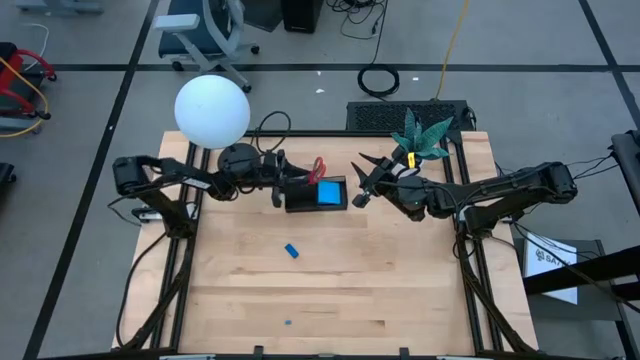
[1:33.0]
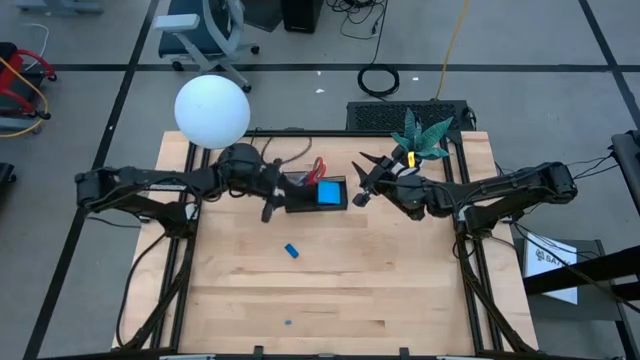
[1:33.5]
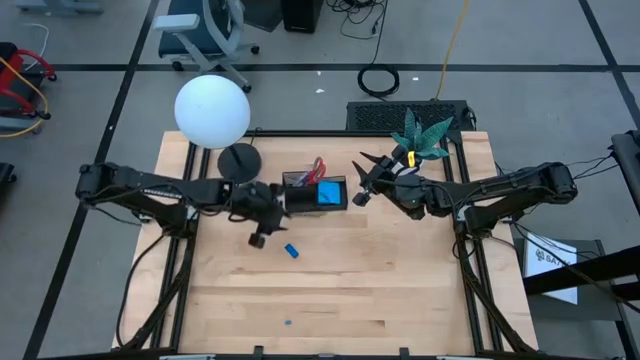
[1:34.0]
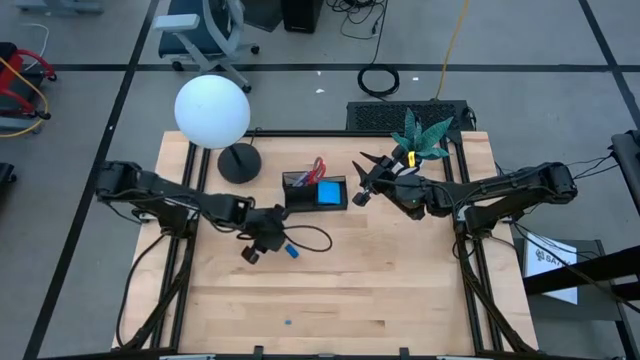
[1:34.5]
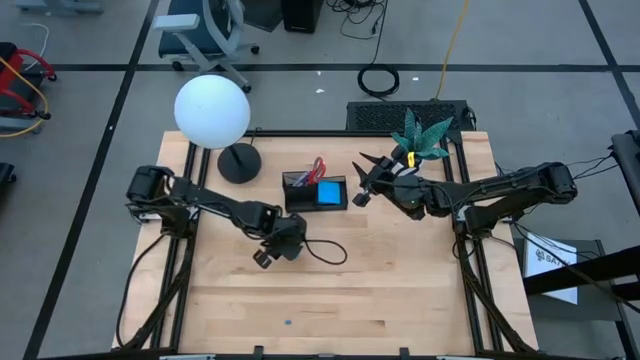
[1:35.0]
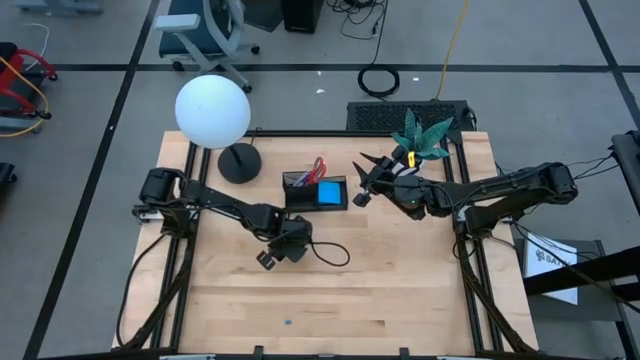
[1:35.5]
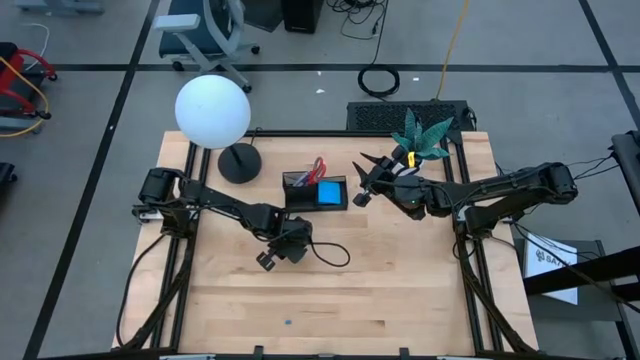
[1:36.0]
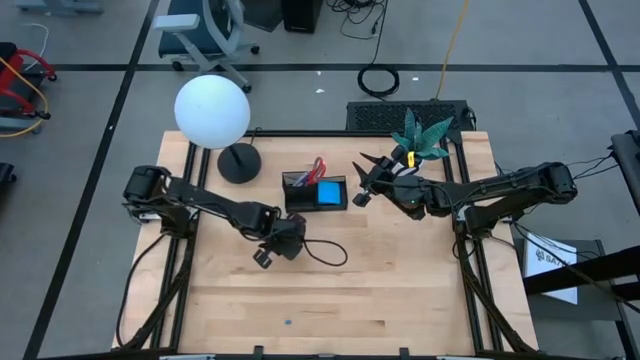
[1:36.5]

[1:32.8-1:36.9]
Task: Pick and place office supplies into organizer
Put the blue eraser into the black mesh organizer

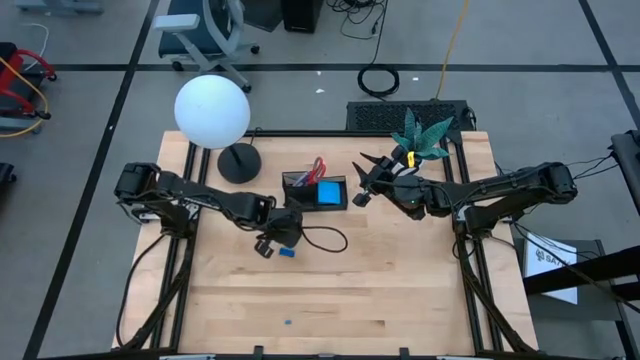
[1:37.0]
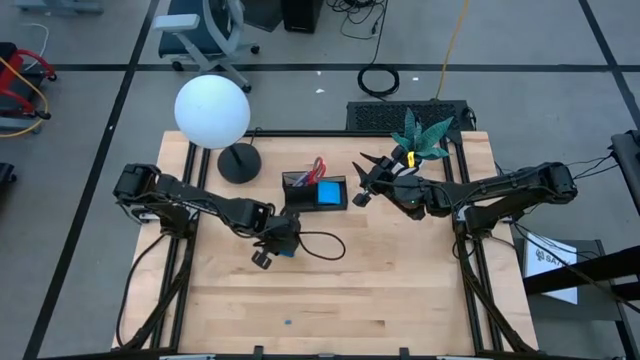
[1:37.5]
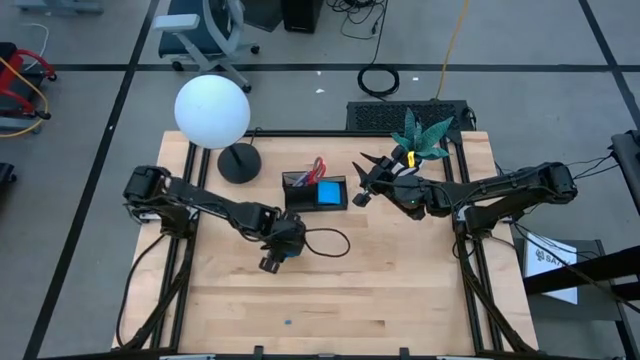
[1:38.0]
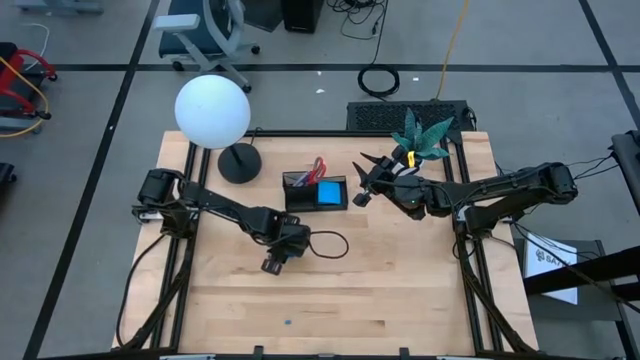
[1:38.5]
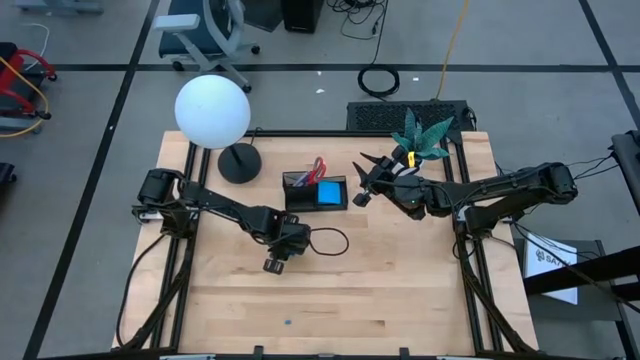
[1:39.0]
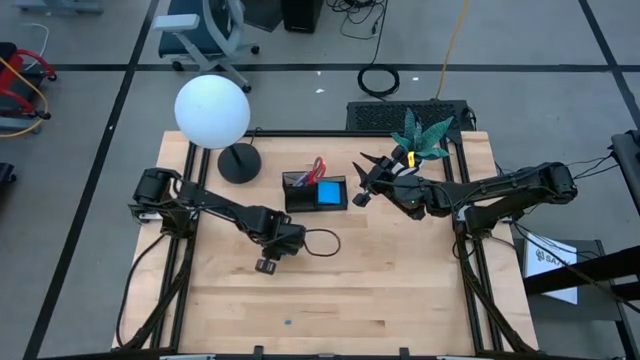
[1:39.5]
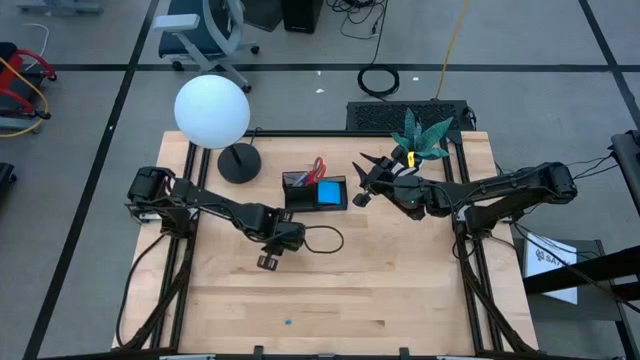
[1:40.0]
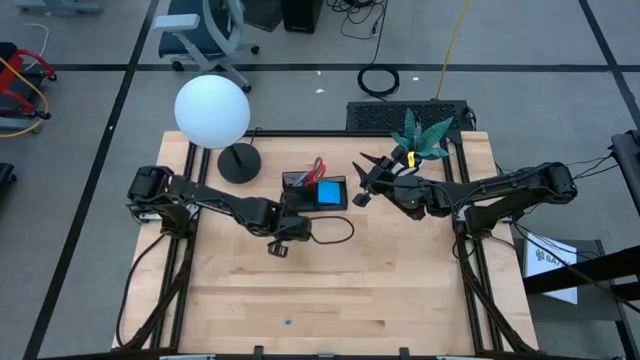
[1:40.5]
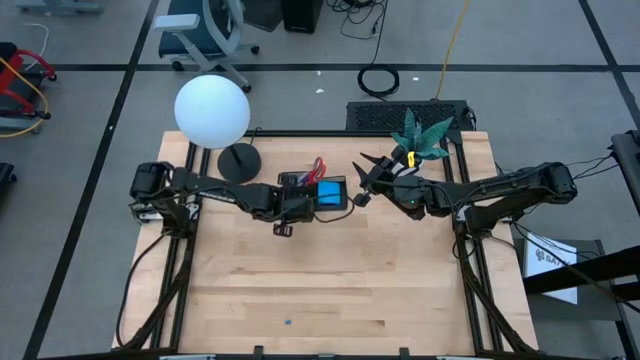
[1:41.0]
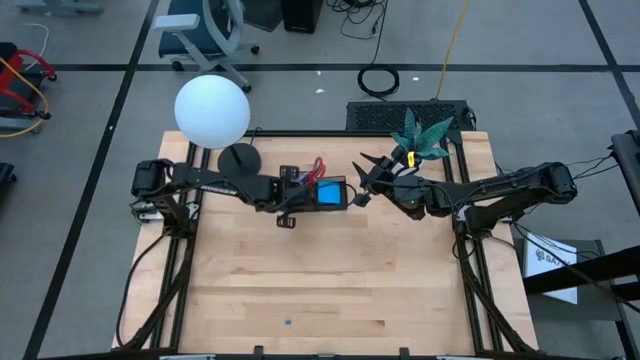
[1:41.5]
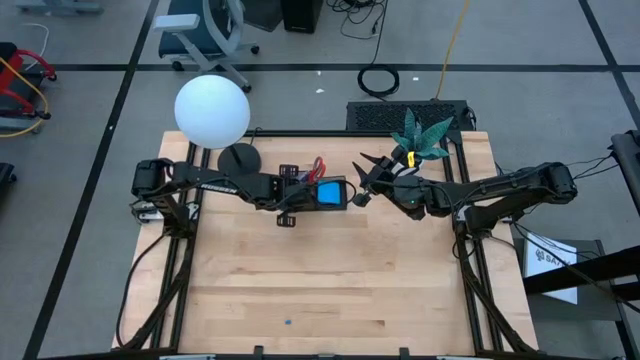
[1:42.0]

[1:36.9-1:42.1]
Put the blue eraser into the black mesh organizer

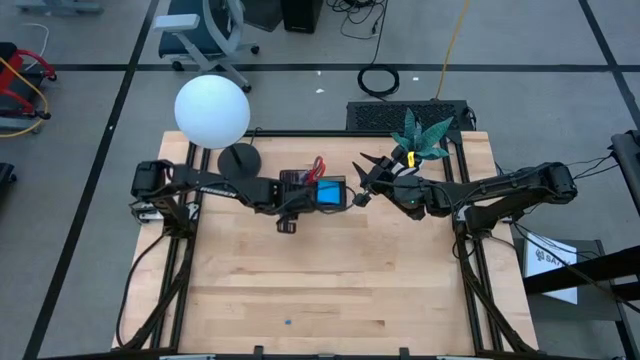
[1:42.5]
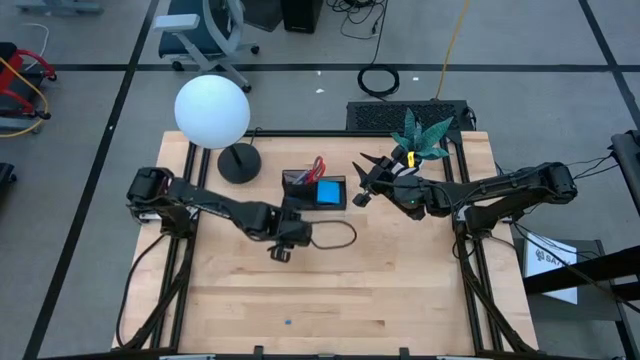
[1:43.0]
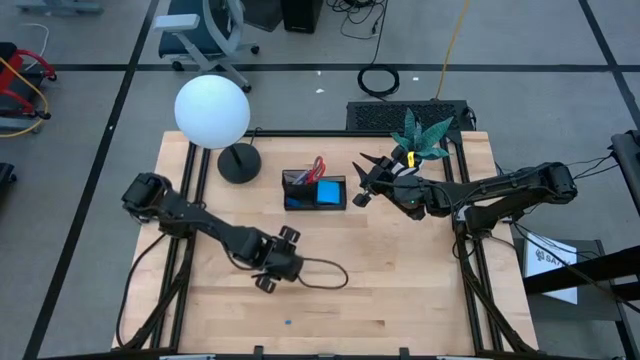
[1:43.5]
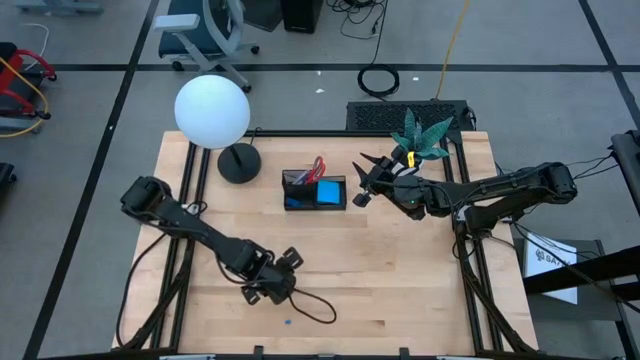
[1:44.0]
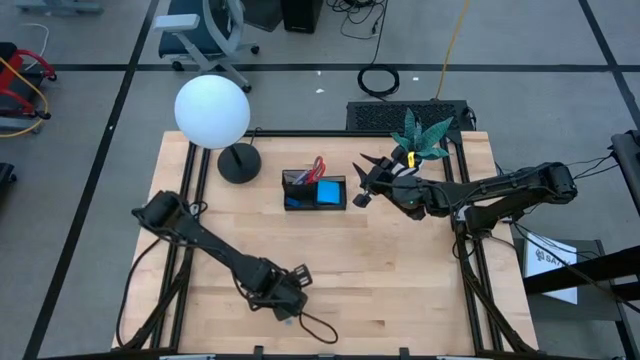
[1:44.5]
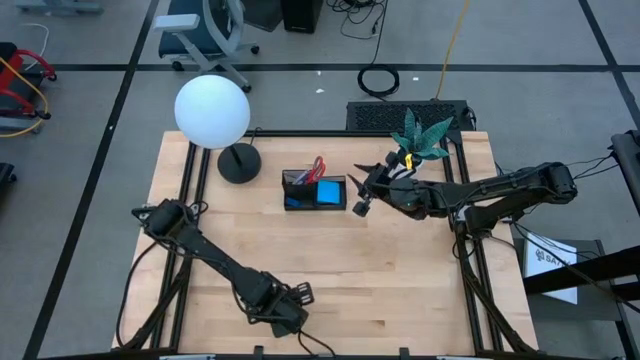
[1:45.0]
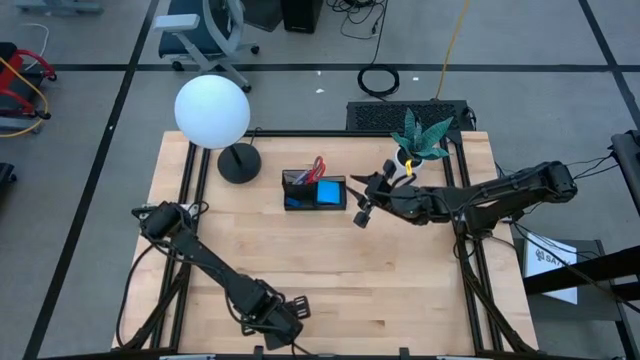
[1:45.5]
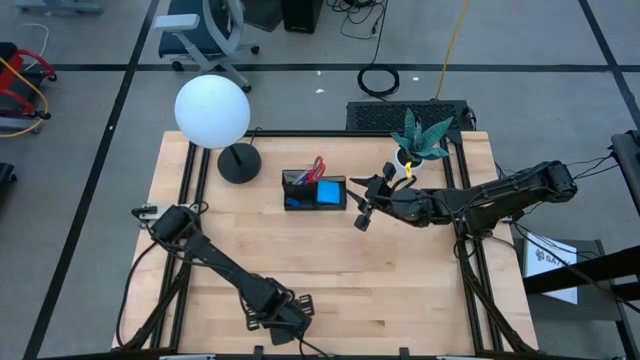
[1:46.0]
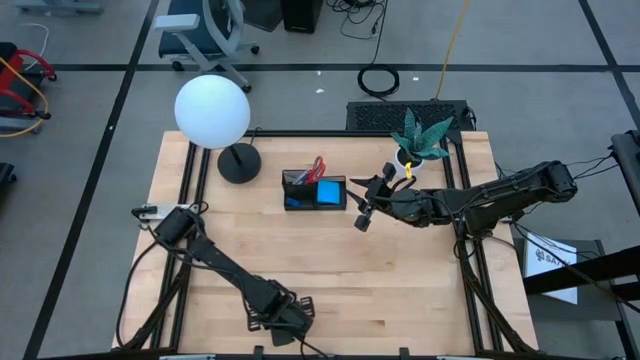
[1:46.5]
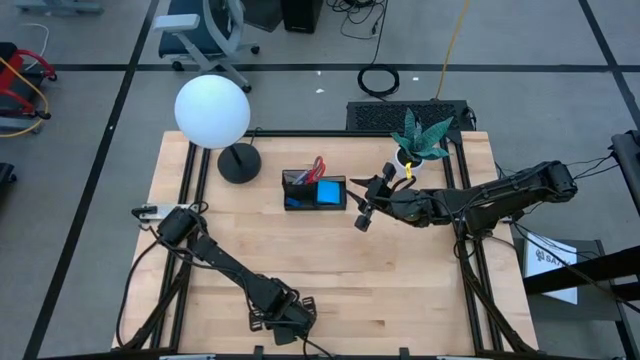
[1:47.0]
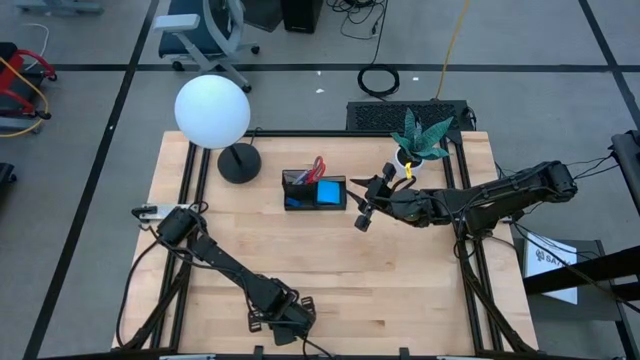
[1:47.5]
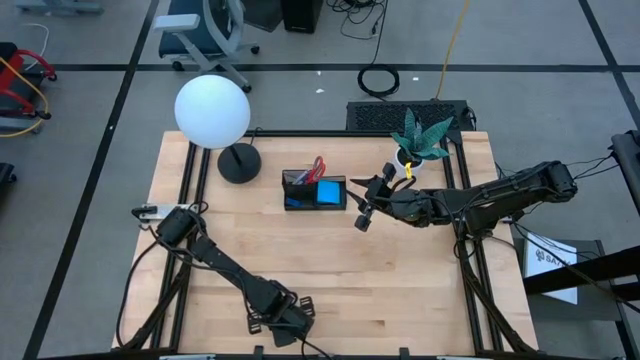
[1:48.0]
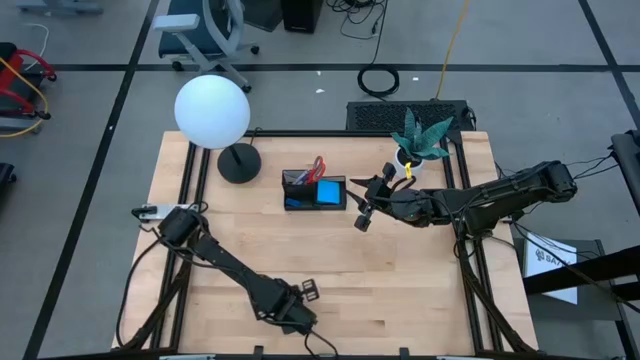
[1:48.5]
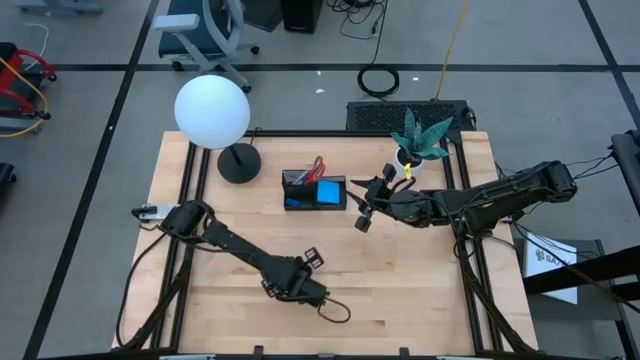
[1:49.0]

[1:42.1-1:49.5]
Put the blue binder clip into the black mesh organizer

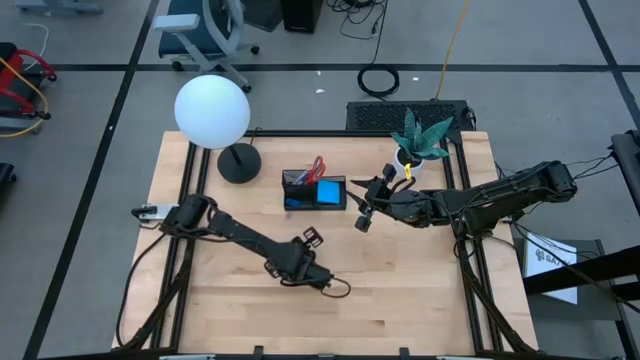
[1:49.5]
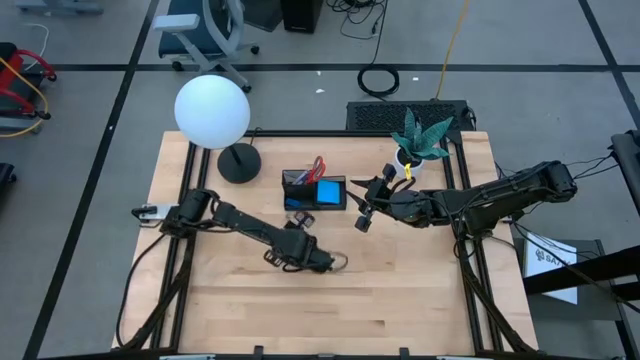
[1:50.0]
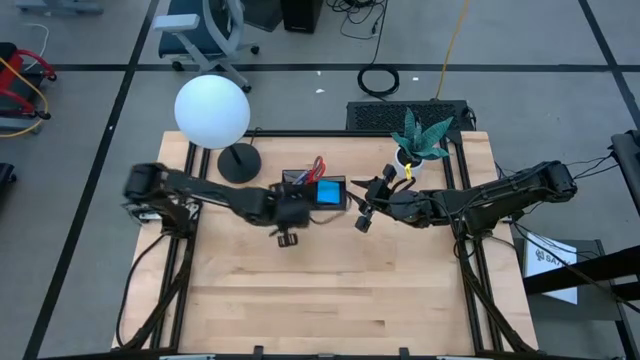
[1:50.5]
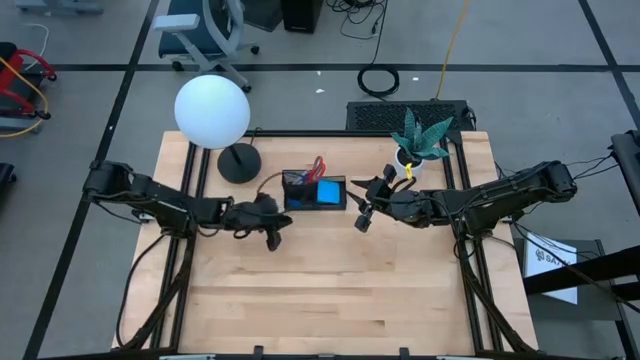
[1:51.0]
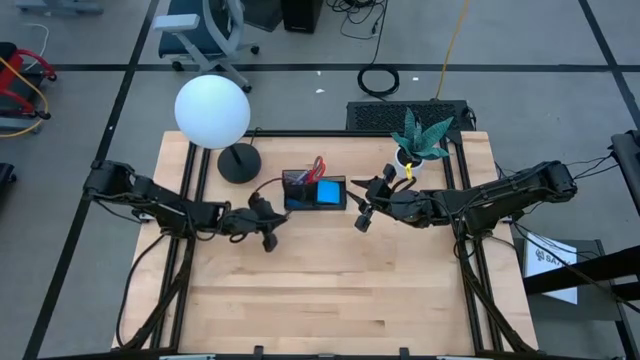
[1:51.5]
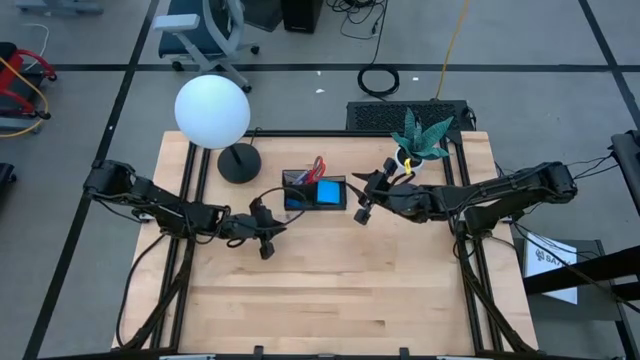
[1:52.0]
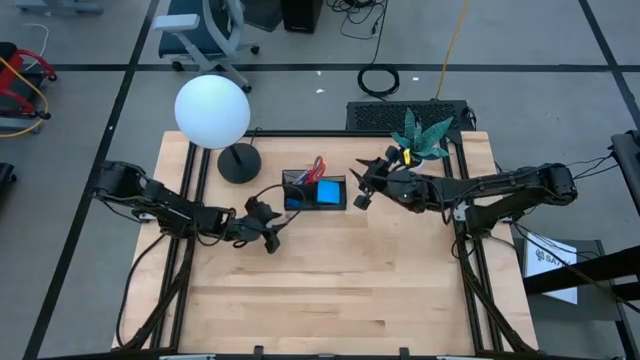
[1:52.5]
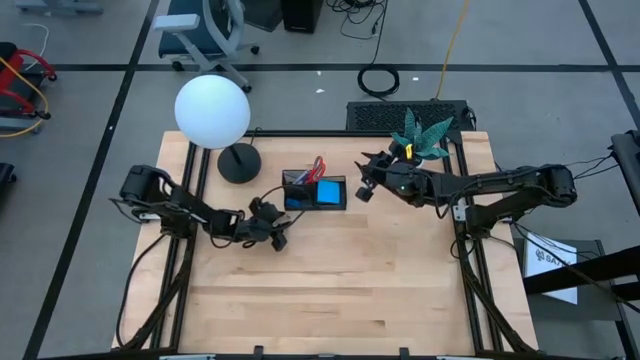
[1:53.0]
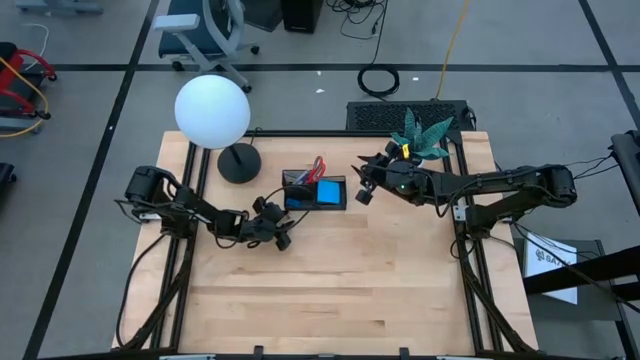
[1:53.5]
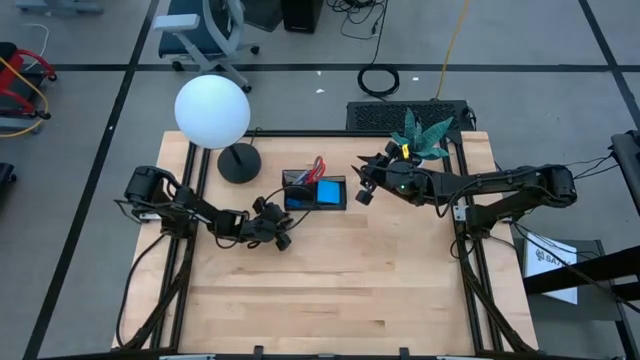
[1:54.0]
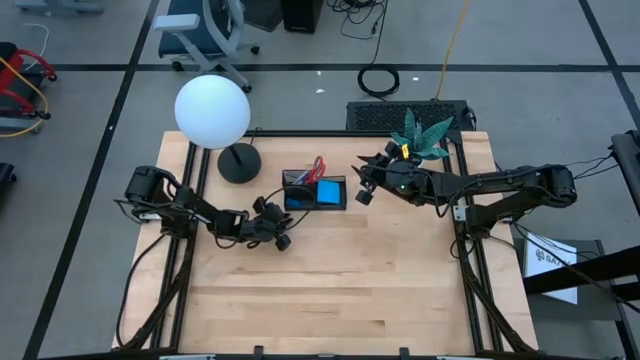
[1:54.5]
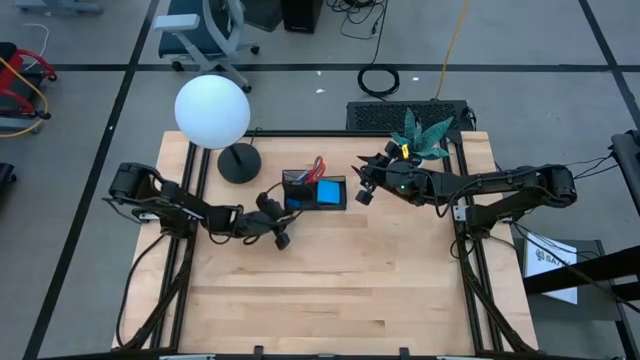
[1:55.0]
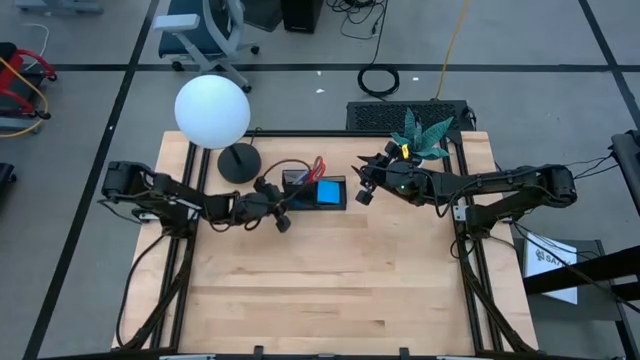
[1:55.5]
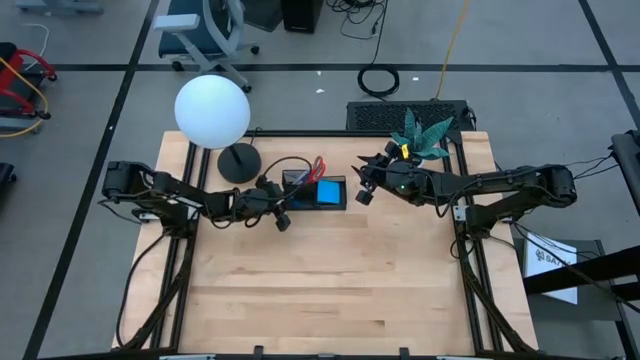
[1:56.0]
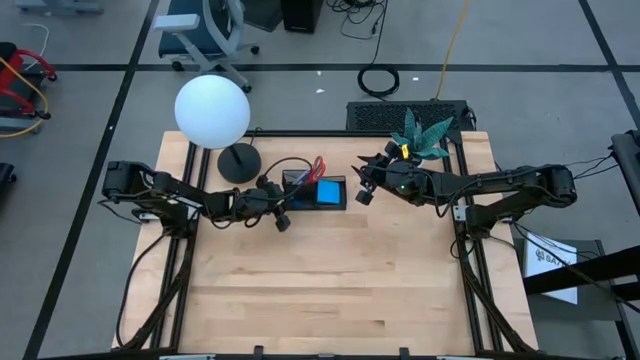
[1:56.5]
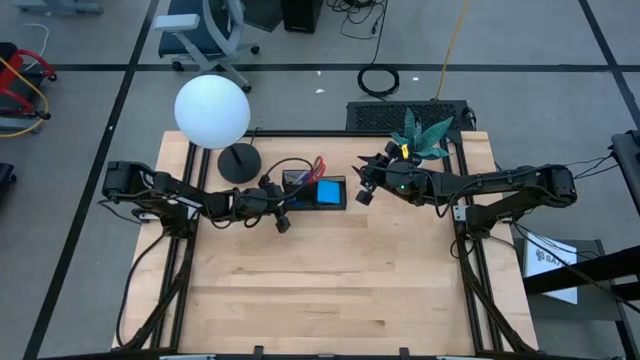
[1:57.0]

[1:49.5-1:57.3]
Put the blue binder clip into the black mesh organizer
